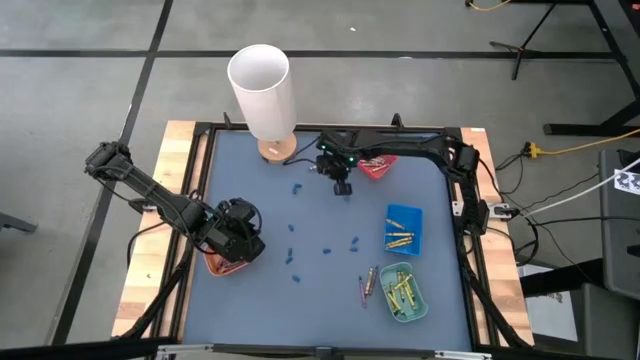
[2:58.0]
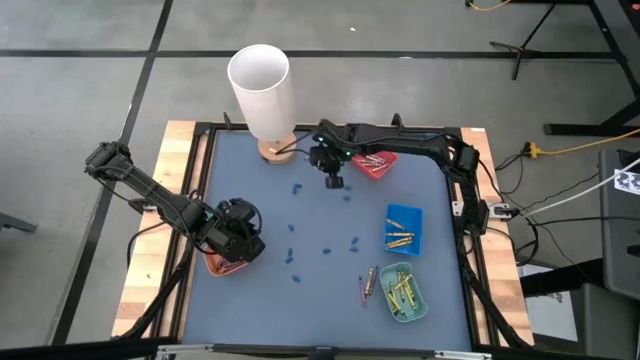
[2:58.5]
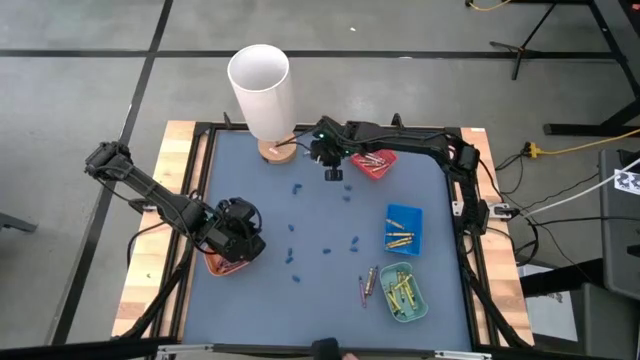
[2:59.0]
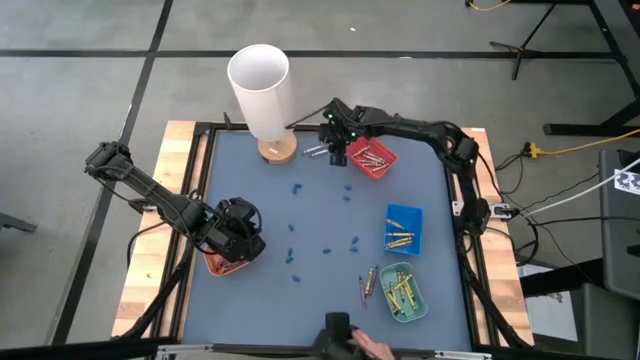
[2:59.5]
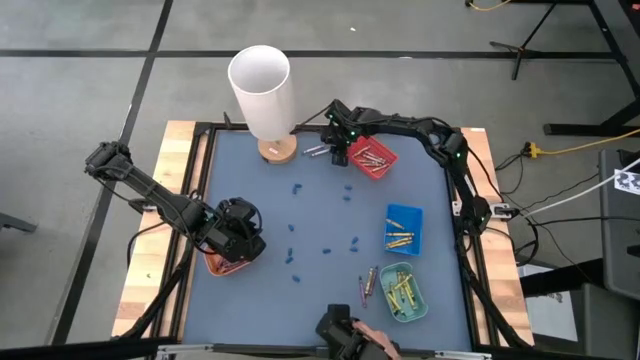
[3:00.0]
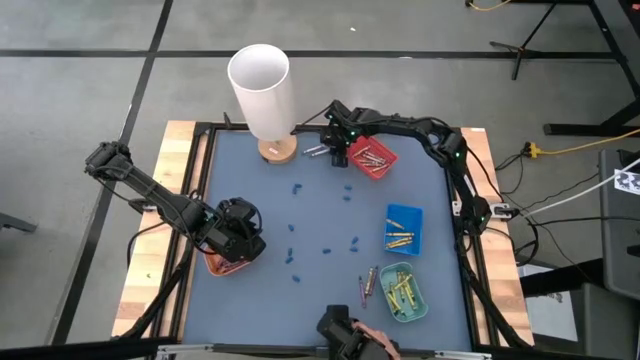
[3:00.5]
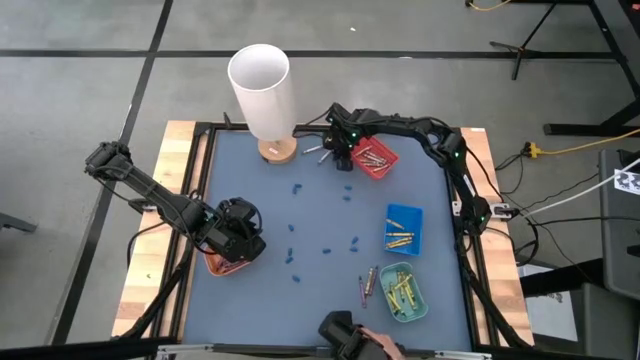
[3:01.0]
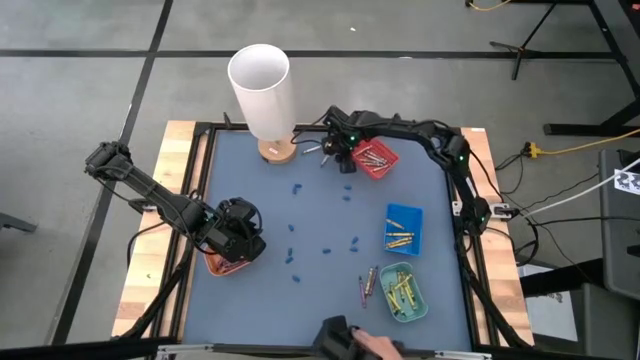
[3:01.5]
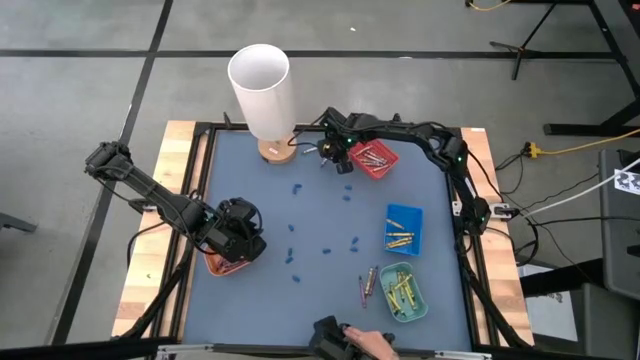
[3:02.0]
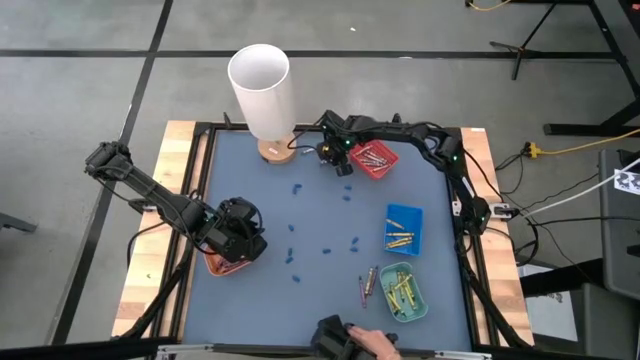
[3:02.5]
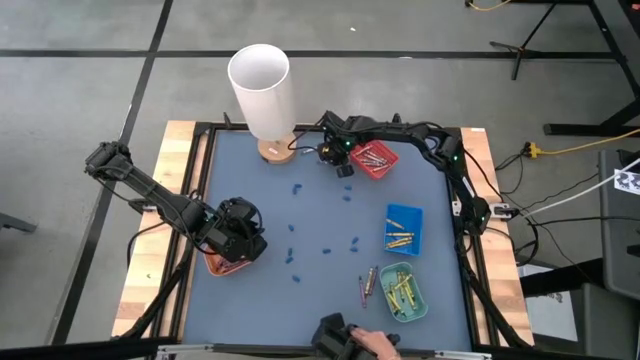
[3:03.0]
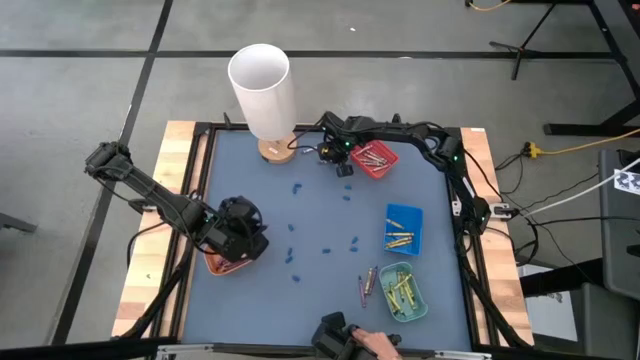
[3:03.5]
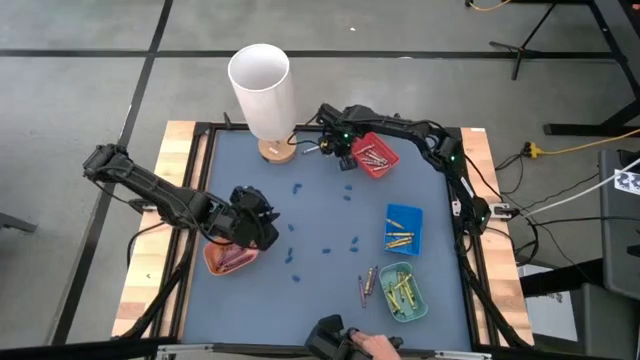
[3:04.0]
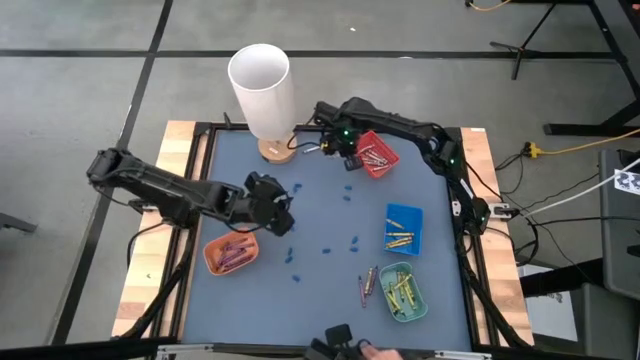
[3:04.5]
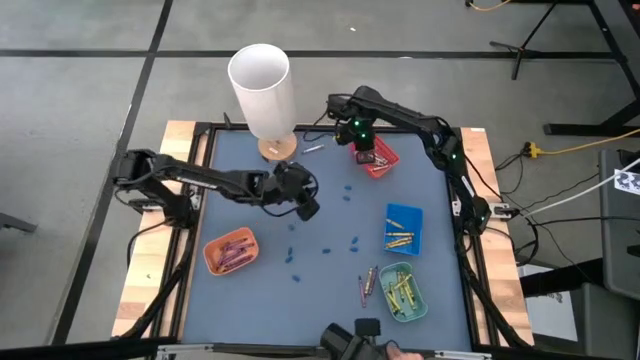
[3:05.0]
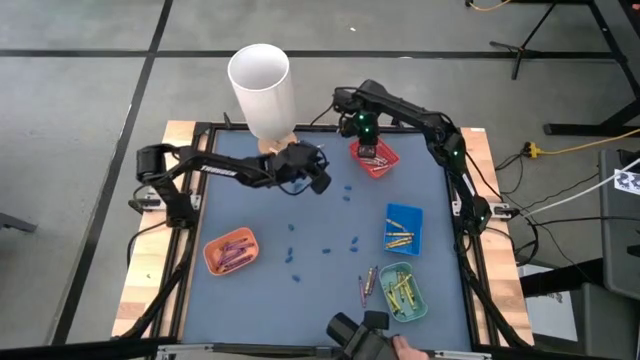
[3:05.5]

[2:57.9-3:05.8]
Task: Sort crayons
Put the grey crayon into the red bin

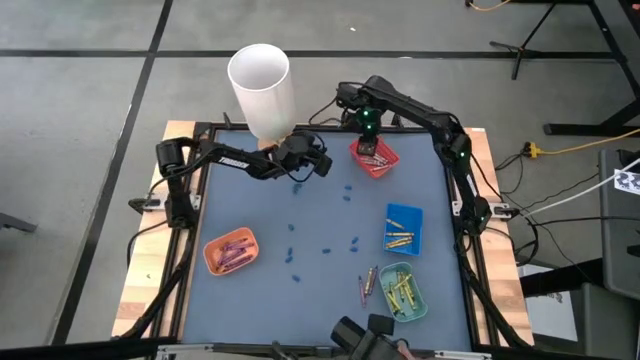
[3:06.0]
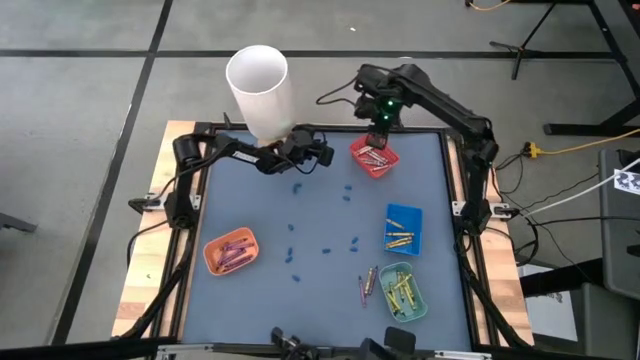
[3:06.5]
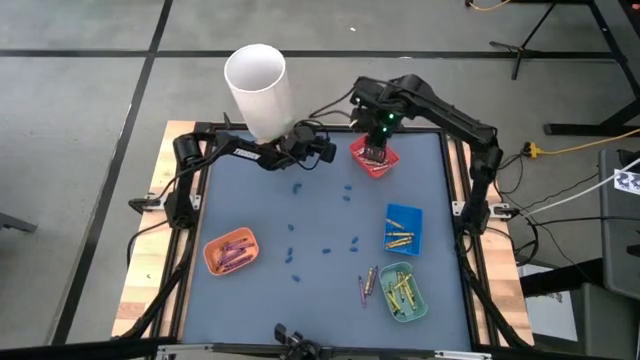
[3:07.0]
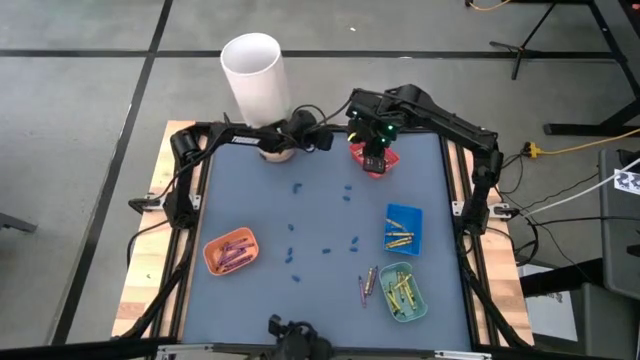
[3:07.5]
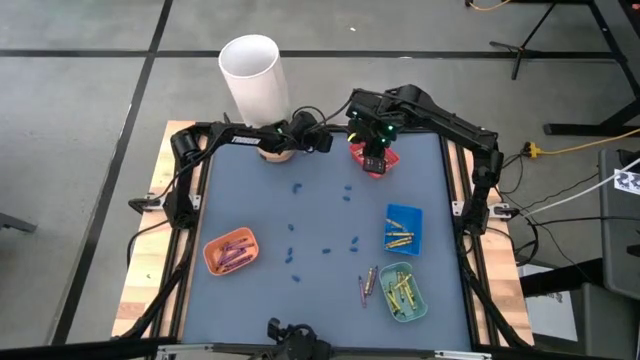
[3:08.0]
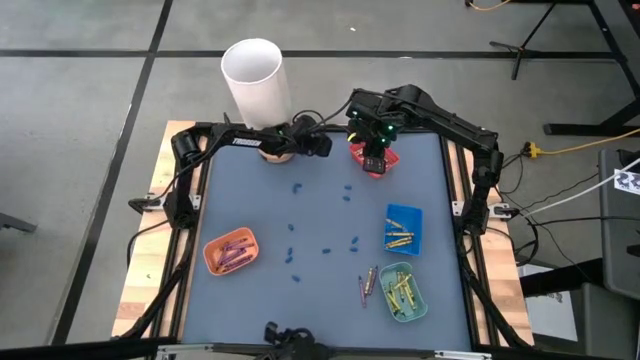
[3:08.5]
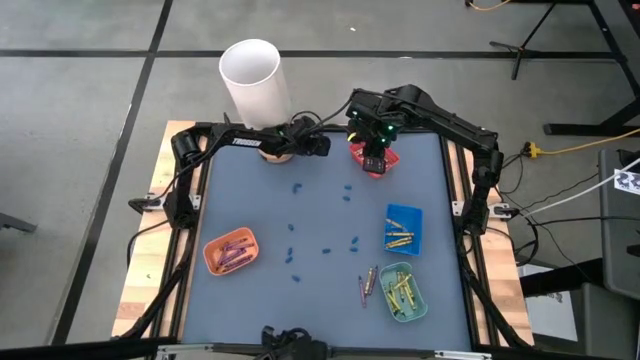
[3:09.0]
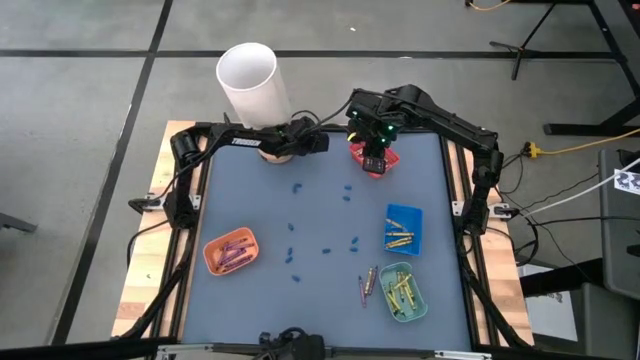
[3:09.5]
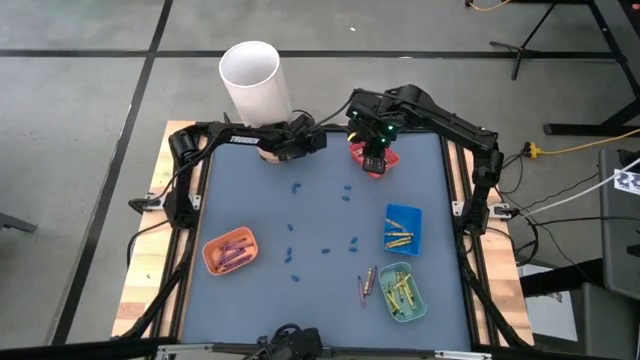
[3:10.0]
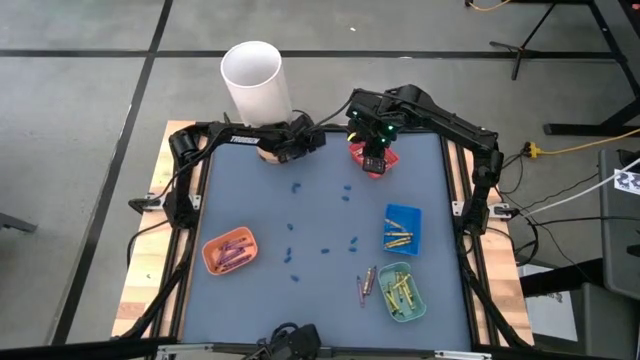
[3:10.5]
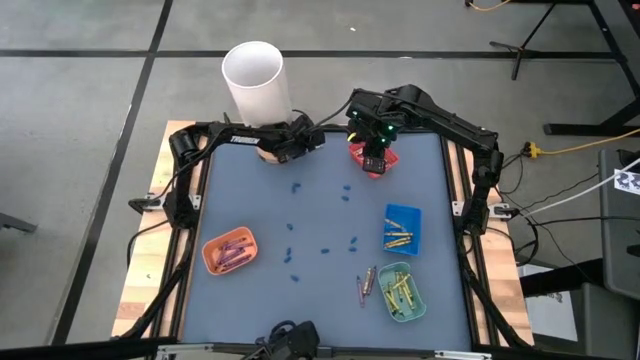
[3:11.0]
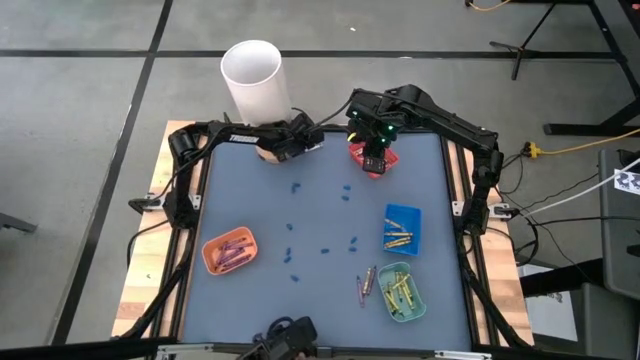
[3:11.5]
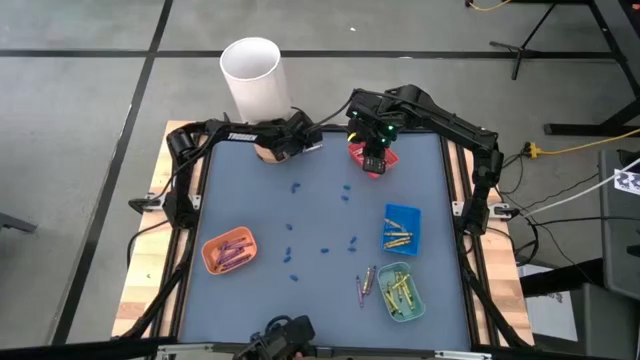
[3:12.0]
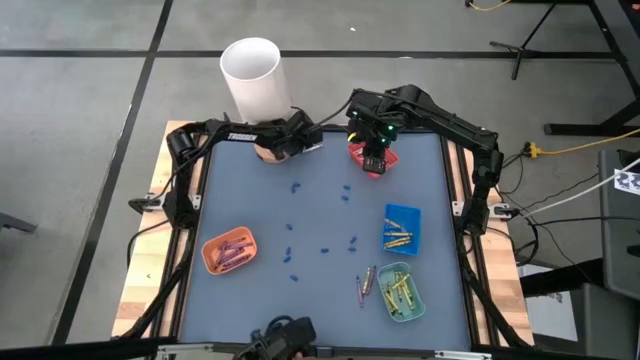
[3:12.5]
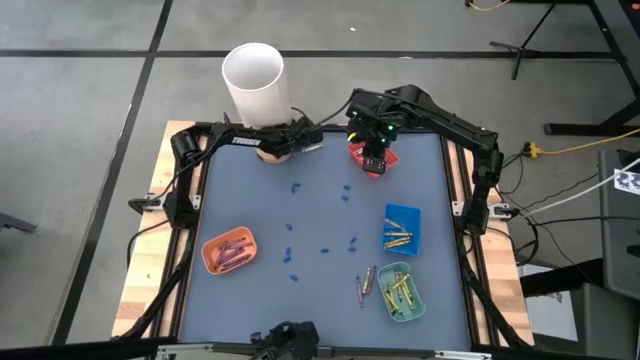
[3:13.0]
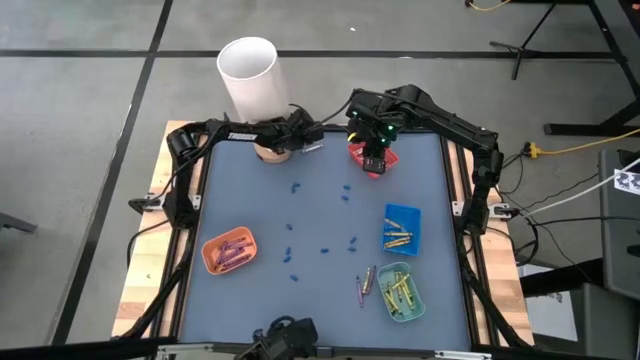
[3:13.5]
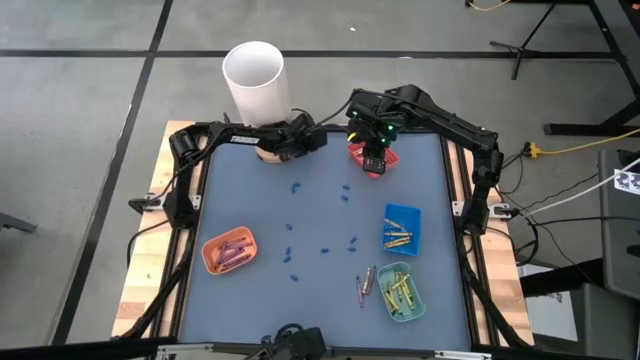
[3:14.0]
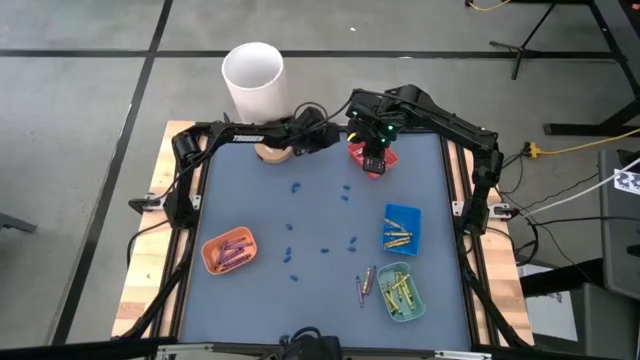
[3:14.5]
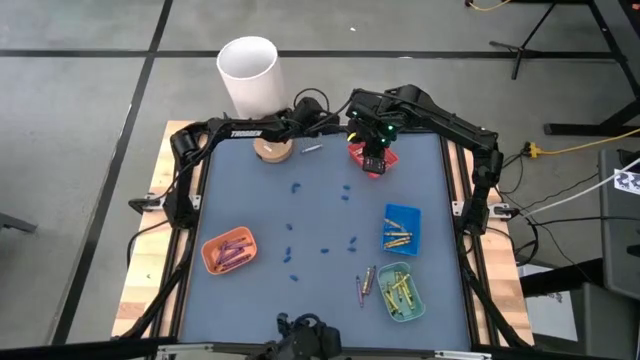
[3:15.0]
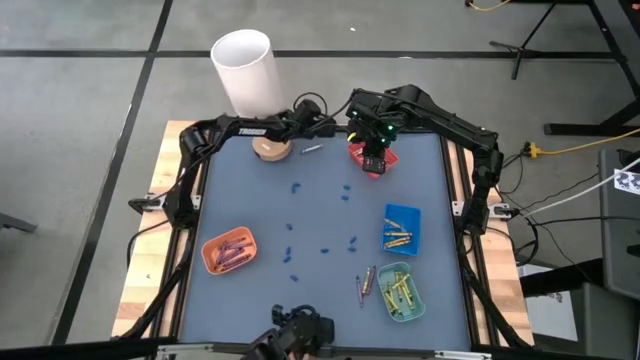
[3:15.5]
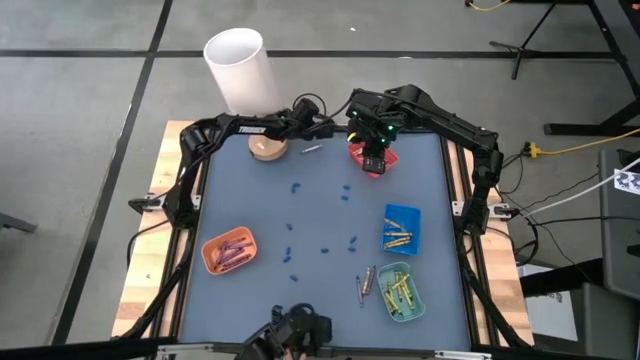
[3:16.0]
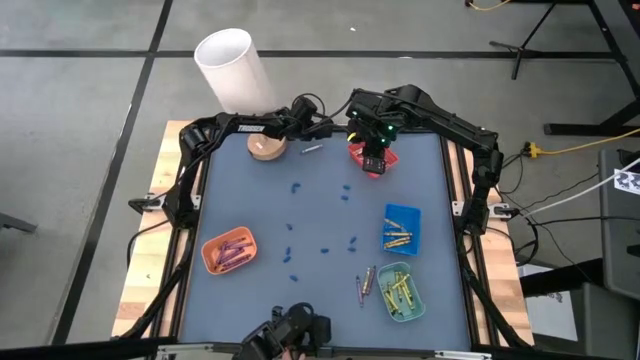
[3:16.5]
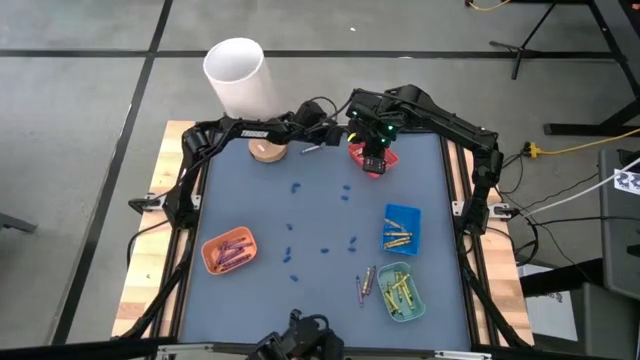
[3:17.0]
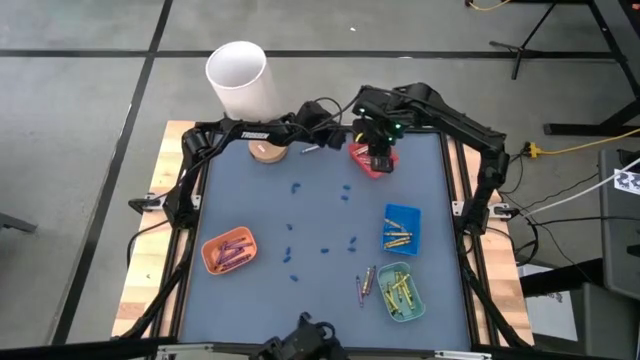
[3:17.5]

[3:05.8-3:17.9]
Put the grey crayon into the red bin
